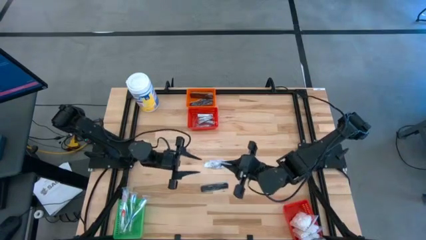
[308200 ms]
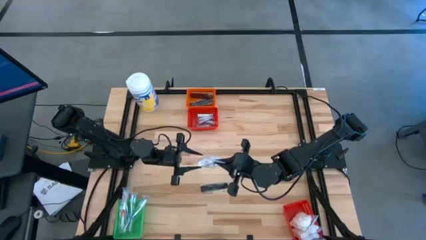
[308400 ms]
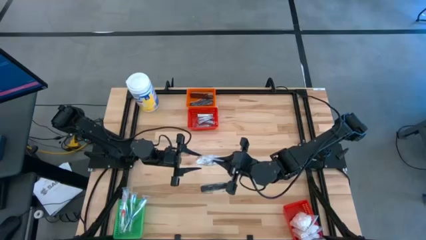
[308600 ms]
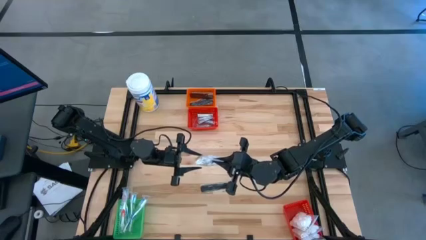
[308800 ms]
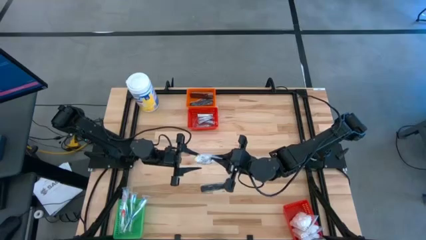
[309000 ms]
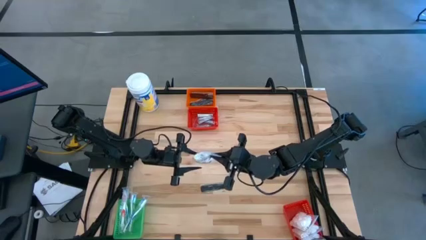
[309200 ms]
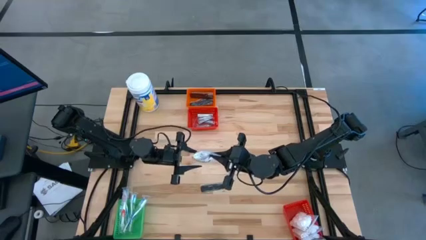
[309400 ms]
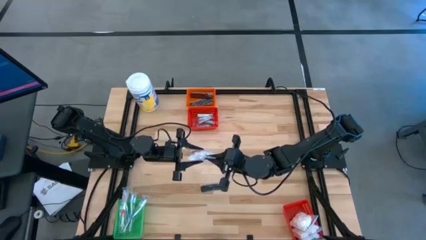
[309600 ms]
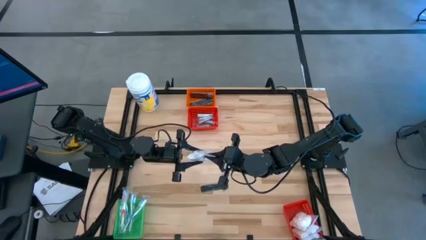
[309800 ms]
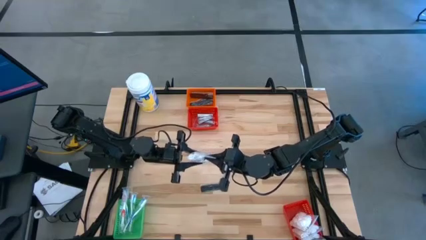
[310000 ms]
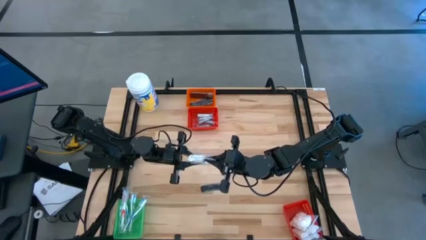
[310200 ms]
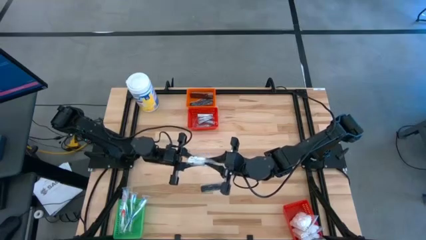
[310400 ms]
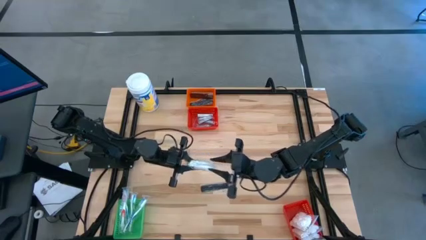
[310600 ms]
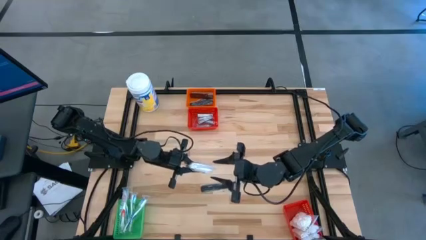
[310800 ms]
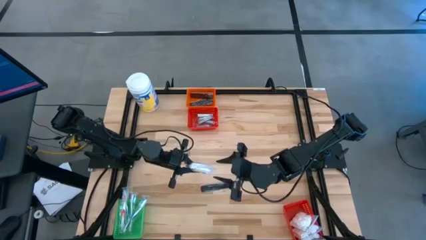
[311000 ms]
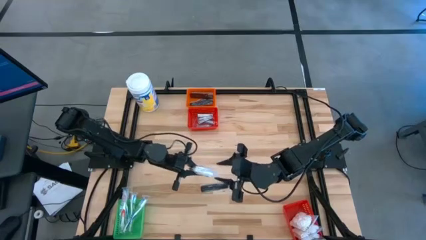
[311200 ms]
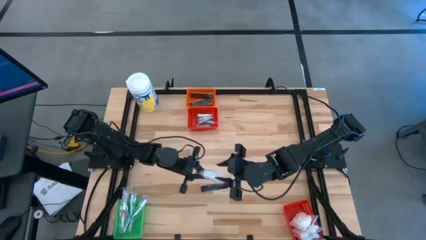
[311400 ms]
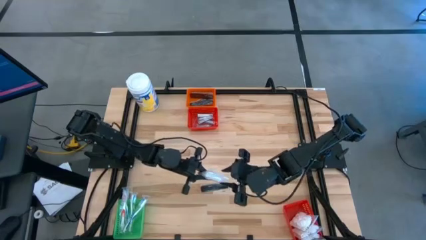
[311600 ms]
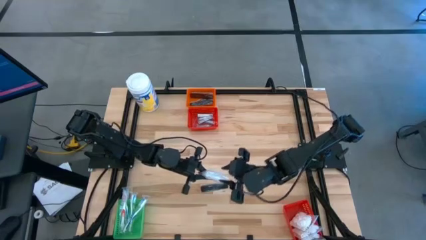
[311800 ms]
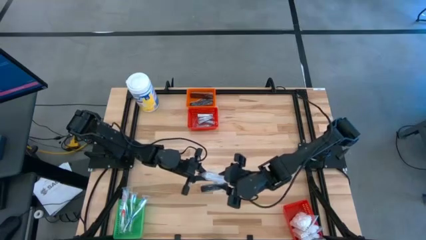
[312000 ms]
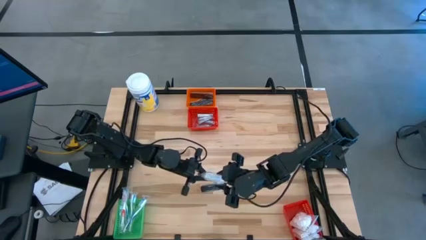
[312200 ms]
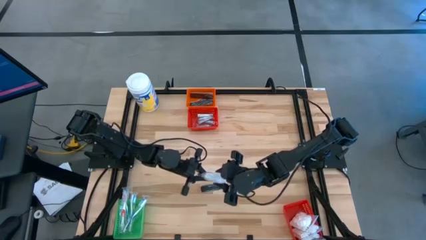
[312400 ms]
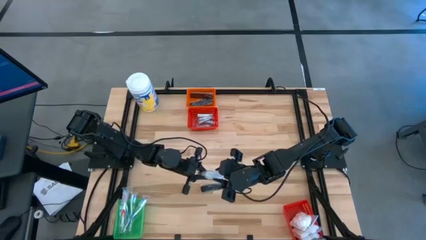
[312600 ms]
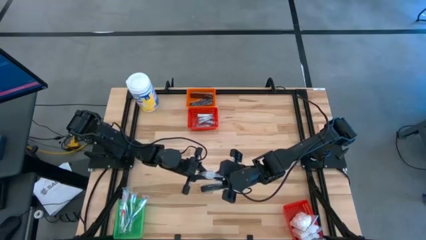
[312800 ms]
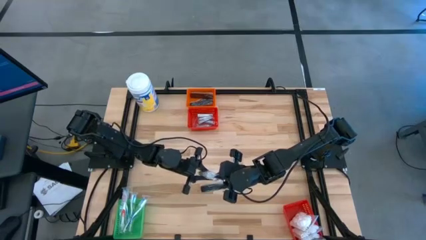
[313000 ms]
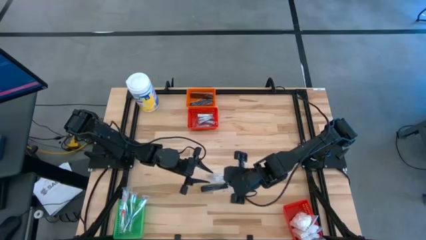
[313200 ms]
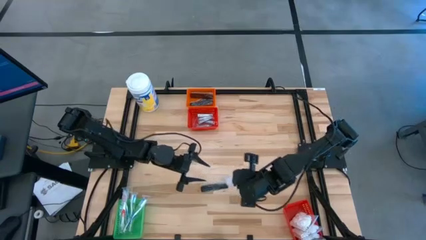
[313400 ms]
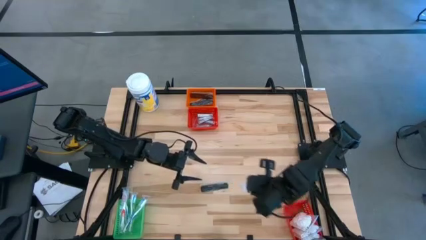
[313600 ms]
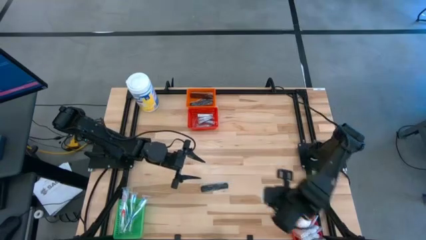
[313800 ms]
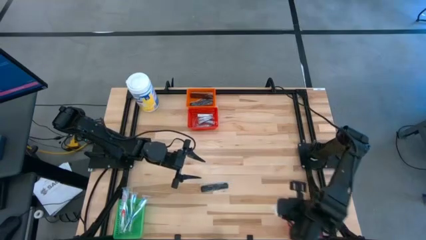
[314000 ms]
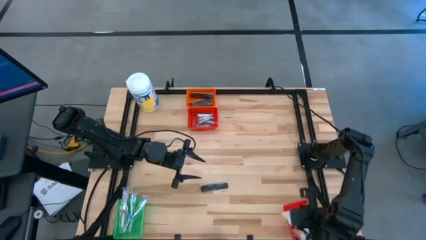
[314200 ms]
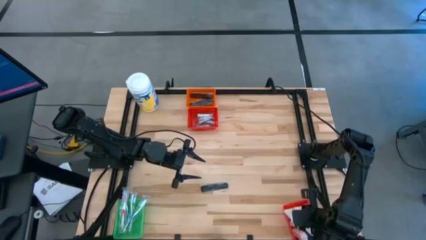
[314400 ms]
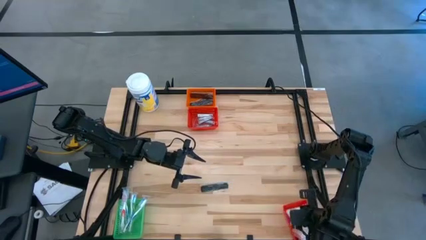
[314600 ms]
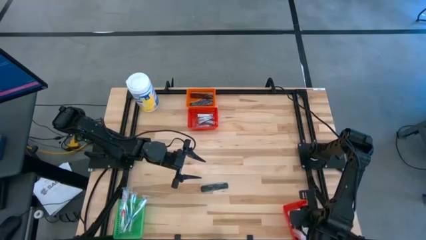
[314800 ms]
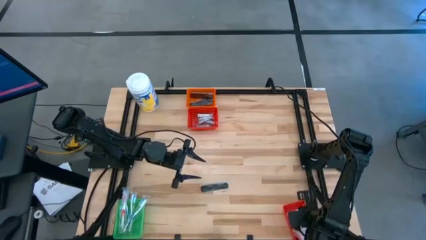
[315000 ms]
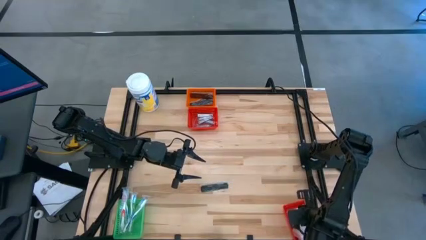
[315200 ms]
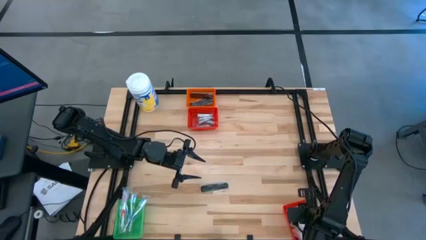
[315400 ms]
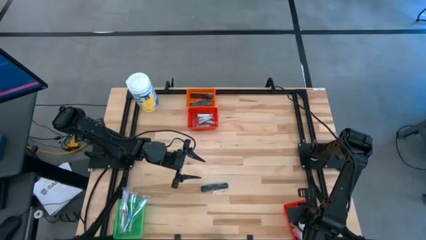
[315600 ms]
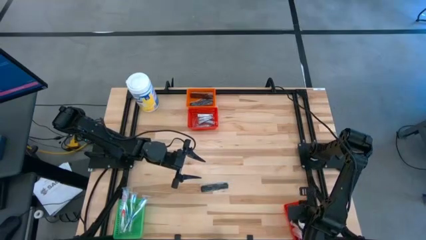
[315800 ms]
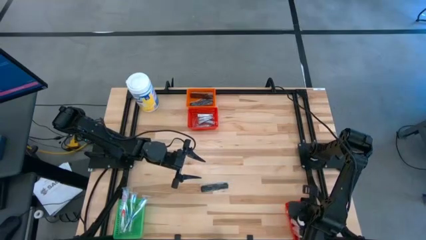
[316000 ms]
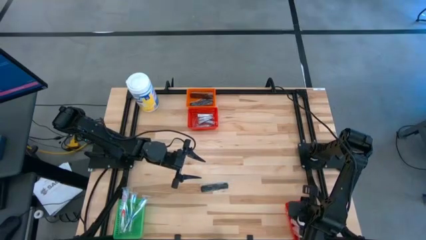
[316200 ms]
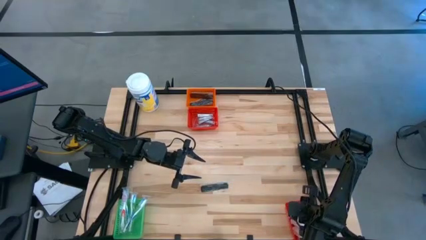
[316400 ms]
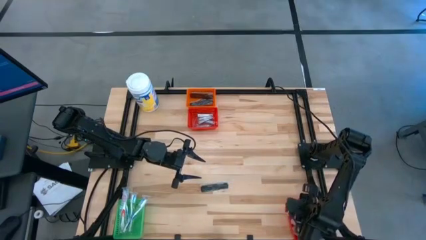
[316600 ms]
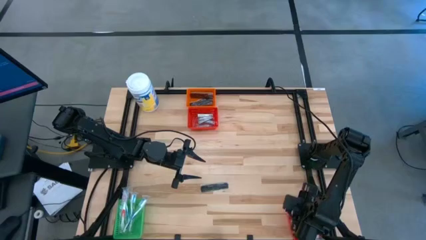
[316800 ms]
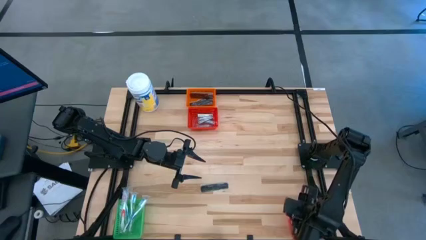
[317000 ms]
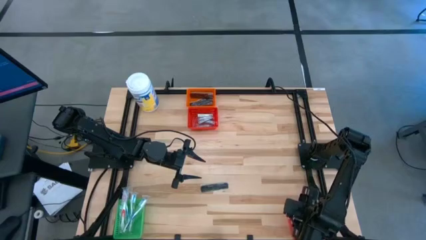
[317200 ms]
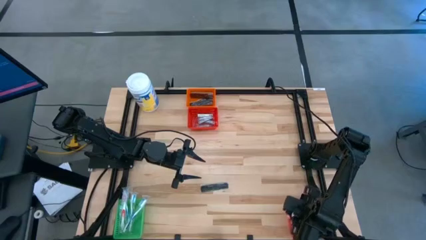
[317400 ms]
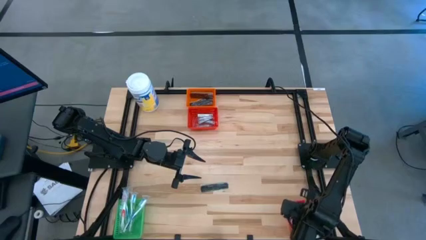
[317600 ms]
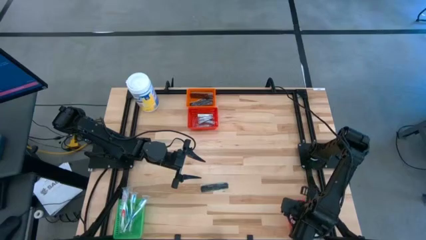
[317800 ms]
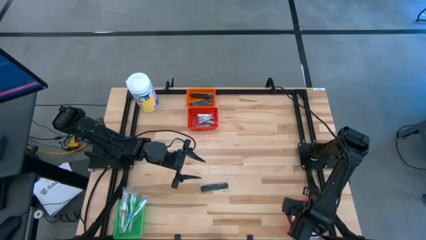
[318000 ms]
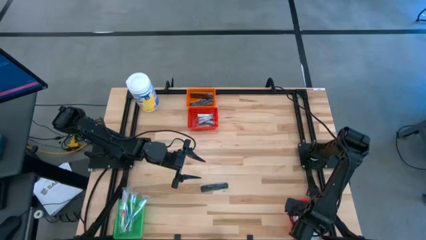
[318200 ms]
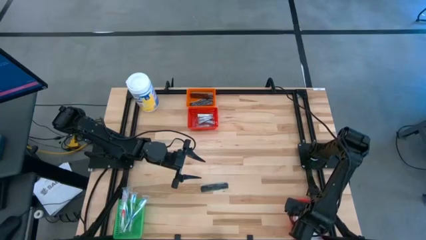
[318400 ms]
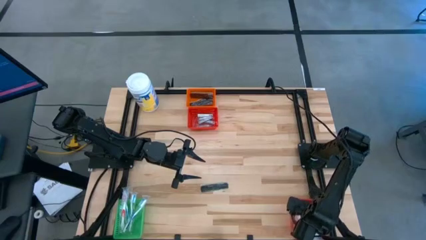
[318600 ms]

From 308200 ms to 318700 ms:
Task: Pick & Place Travel size toiletries
Put the cotton pack into the bottom red basket

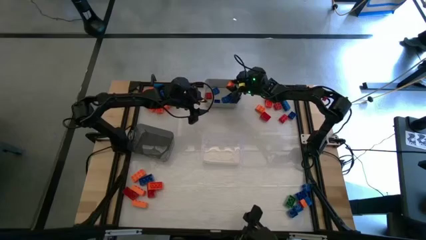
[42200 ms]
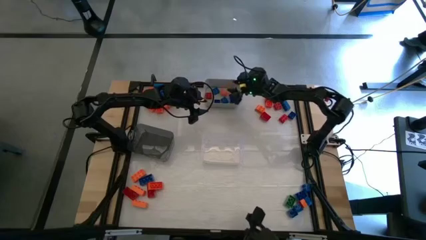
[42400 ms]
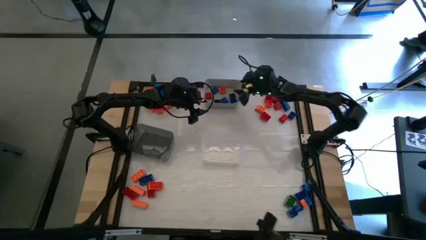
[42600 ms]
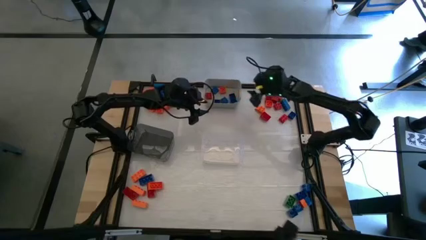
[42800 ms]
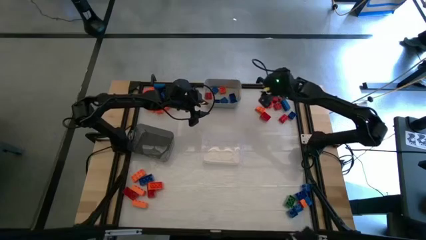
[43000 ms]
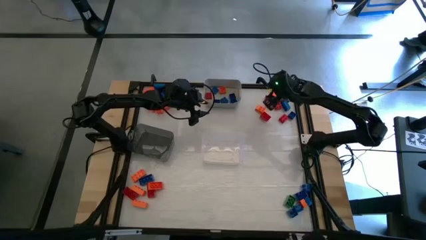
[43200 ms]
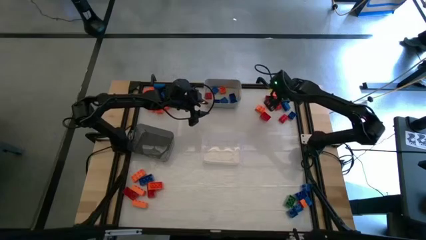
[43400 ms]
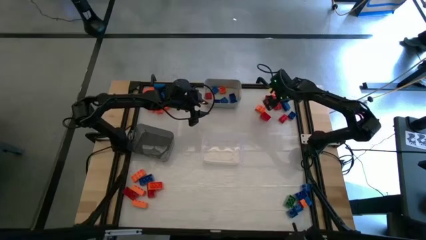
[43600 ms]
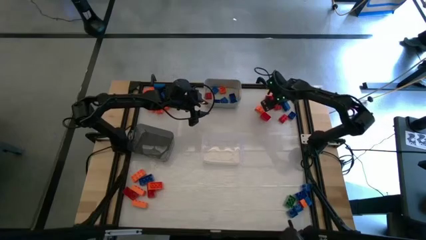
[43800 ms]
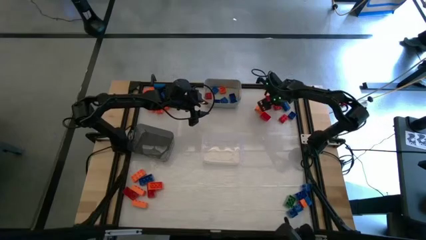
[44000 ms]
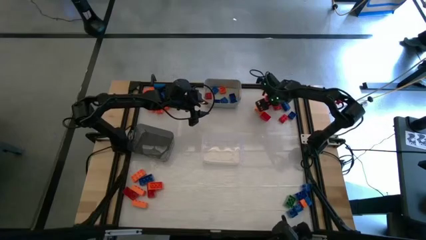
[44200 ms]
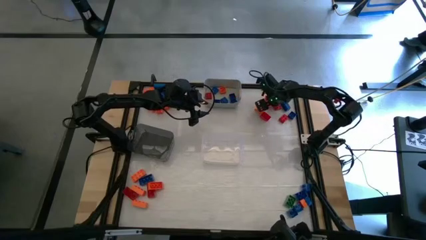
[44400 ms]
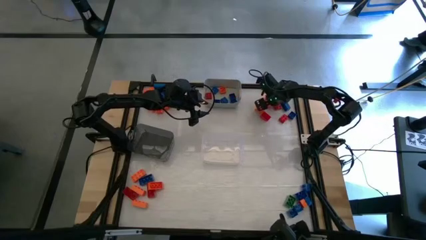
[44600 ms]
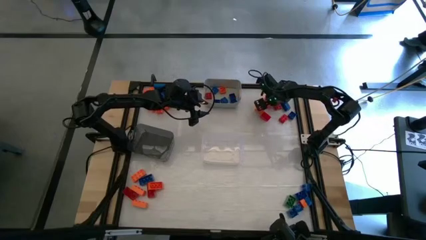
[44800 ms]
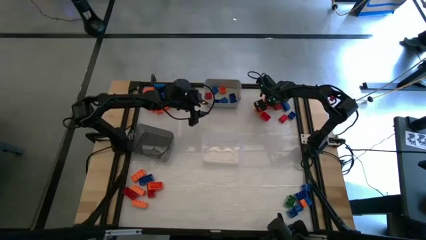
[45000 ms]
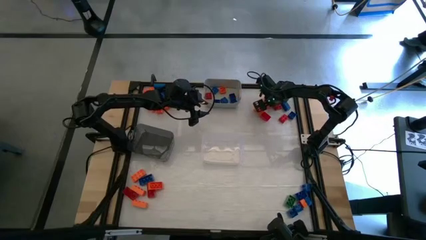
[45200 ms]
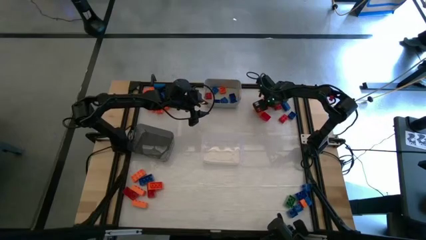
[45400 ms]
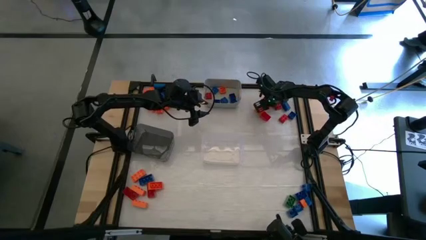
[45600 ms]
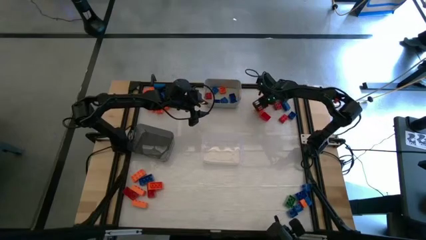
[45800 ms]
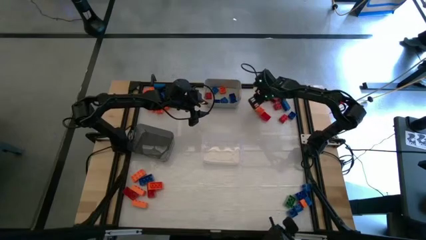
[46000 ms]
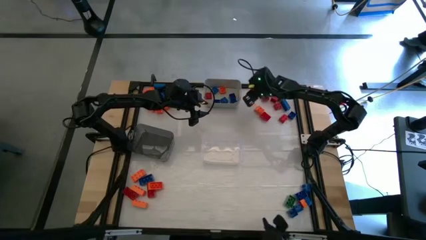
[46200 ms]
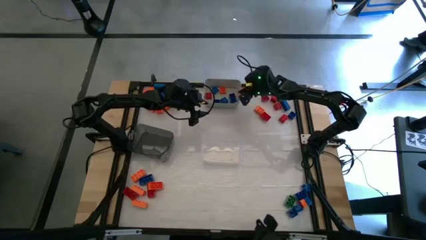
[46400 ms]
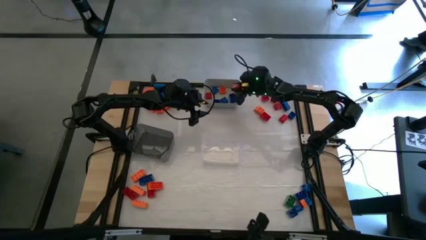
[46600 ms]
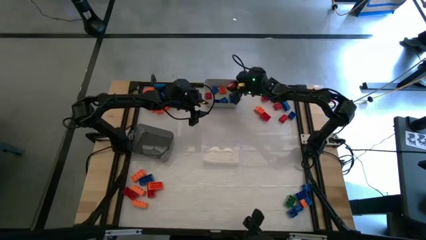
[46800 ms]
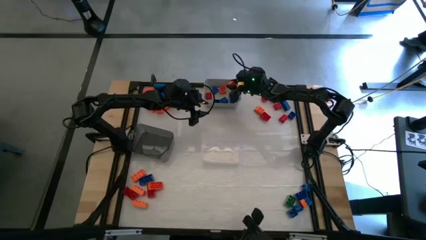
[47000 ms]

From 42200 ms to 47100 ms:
Task: Sort blocks by size
Put the small orange game piece into the gray bin

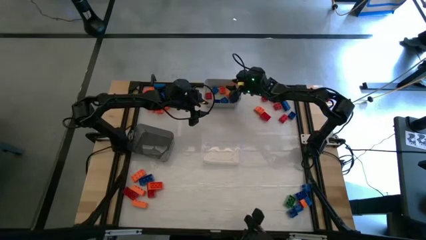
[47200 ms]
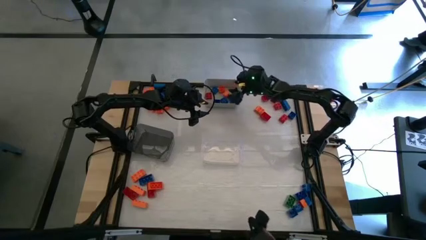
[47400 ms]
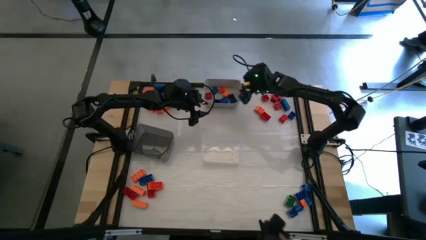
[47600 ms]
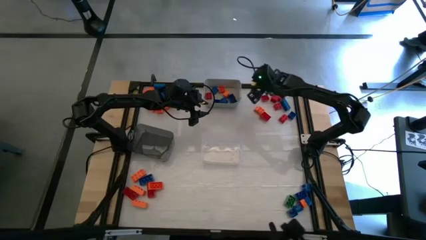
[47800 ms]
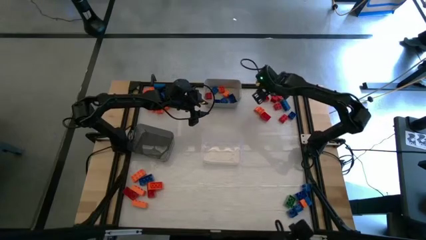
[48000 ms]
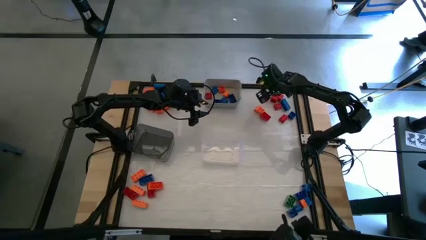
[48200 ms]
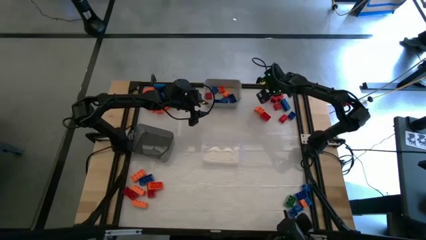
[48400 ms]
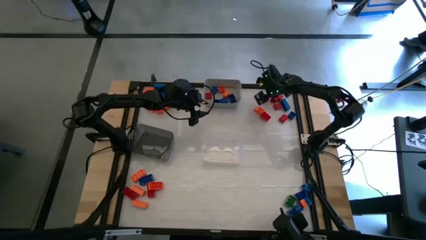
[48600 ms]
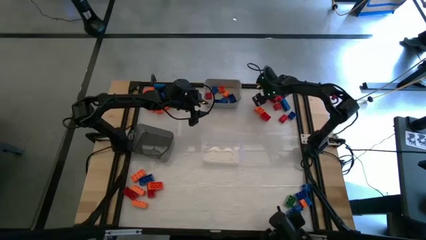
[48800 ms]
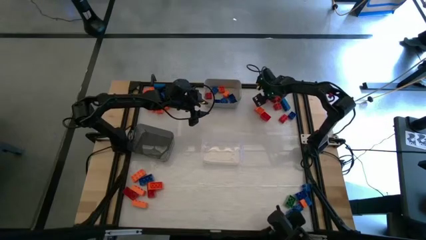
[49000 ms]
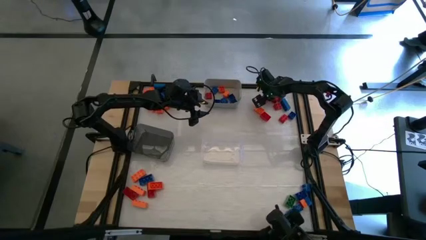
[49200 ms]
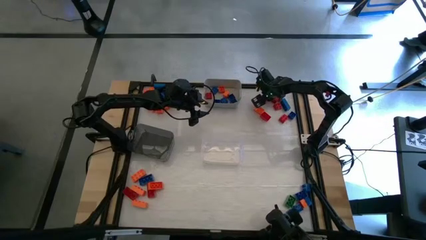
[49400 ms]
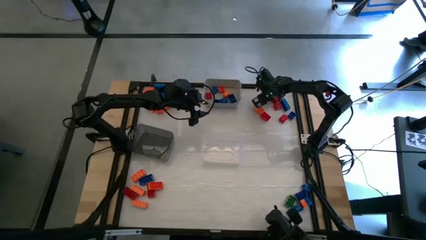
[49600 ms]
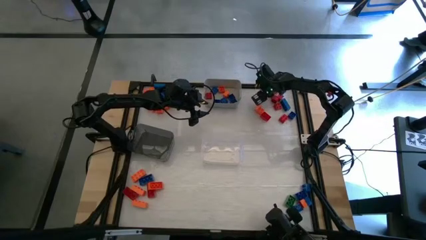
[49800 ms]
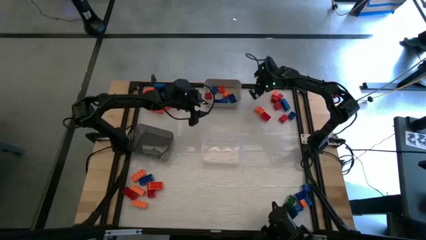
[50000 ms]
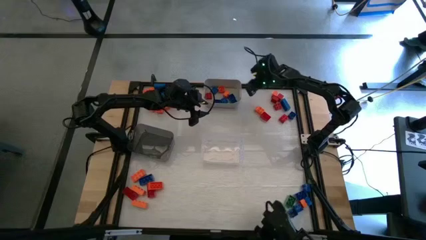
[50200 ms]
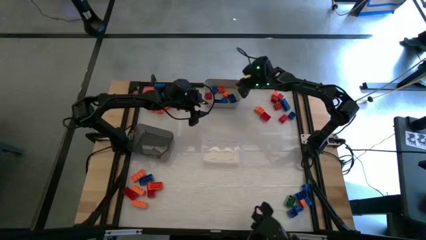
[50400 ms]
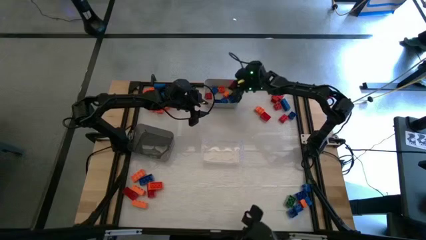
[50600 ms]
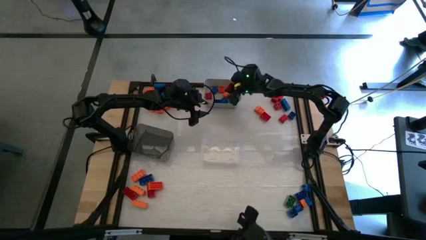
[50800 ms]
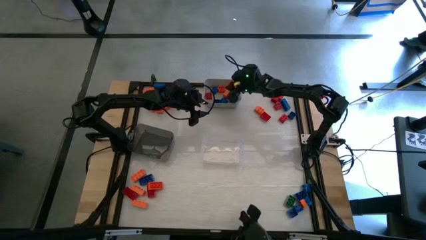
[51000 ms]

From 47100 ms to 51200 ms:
Put the small red game piece into the gray bin
